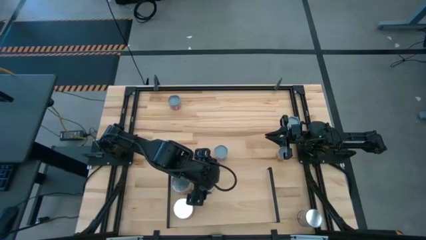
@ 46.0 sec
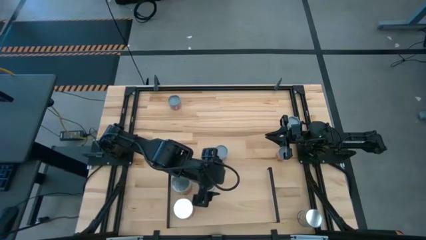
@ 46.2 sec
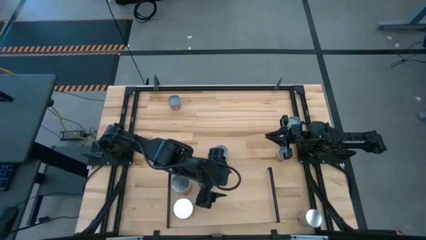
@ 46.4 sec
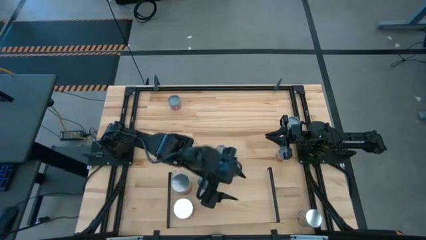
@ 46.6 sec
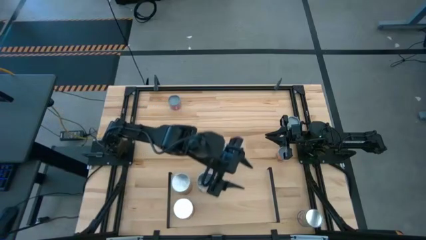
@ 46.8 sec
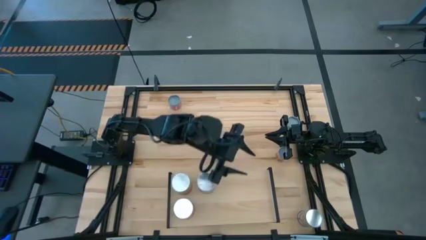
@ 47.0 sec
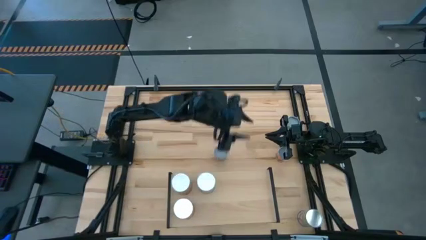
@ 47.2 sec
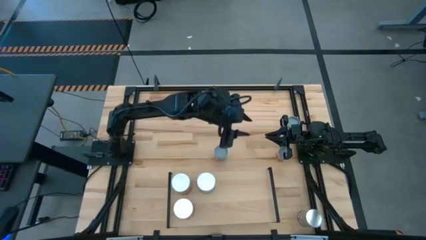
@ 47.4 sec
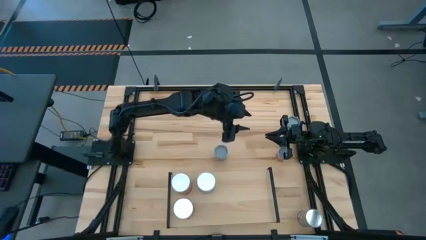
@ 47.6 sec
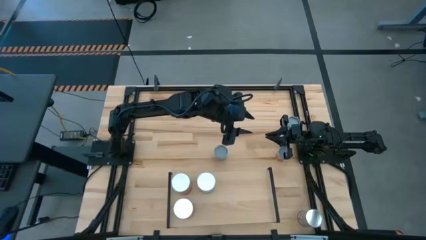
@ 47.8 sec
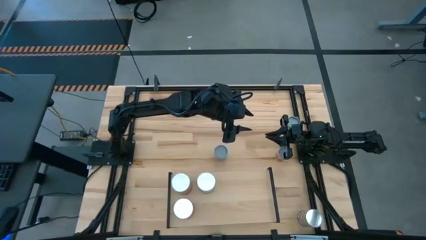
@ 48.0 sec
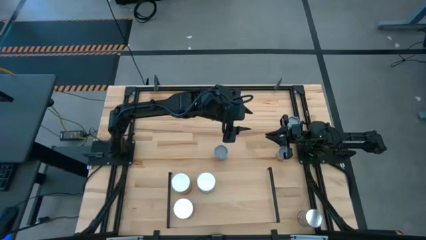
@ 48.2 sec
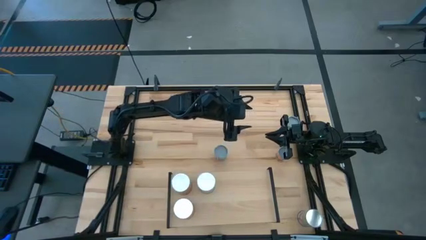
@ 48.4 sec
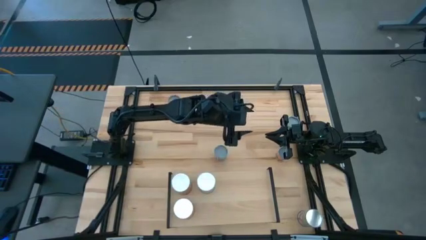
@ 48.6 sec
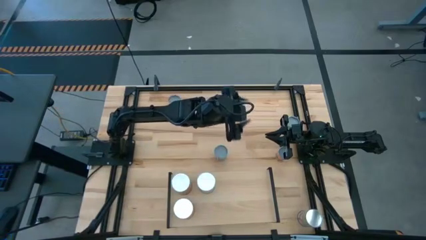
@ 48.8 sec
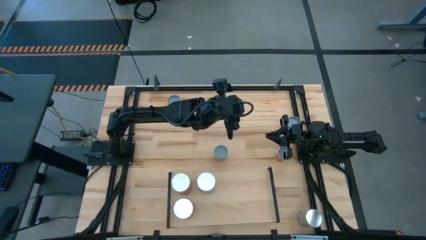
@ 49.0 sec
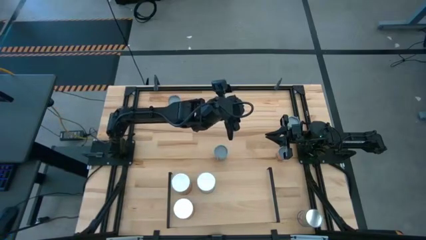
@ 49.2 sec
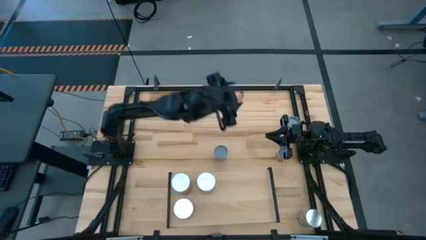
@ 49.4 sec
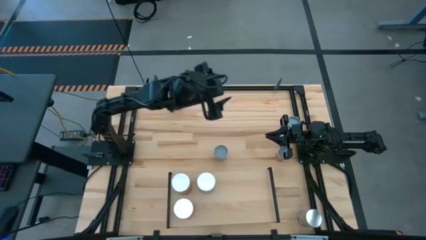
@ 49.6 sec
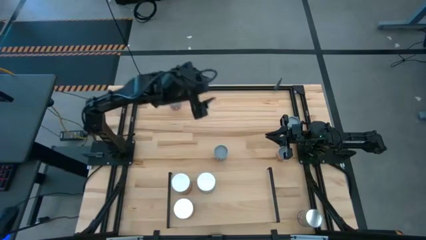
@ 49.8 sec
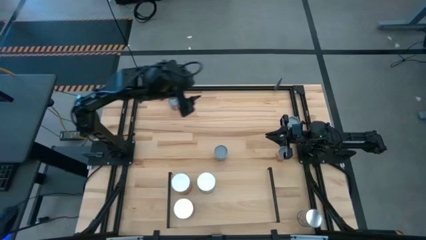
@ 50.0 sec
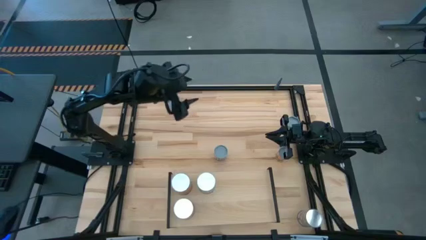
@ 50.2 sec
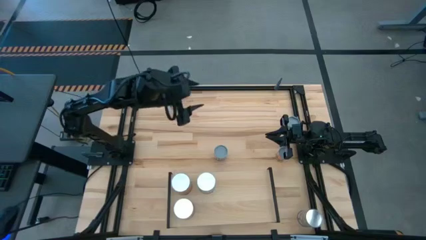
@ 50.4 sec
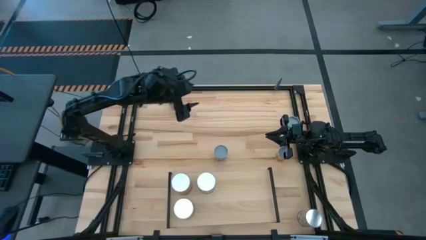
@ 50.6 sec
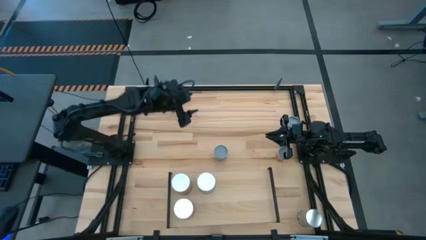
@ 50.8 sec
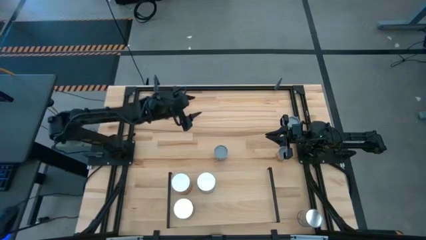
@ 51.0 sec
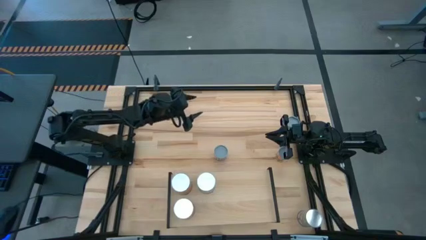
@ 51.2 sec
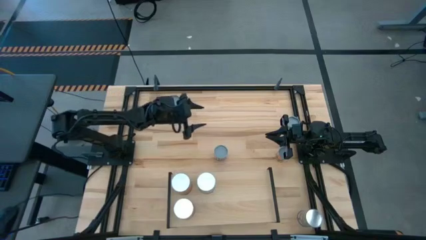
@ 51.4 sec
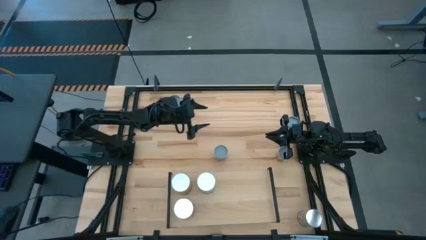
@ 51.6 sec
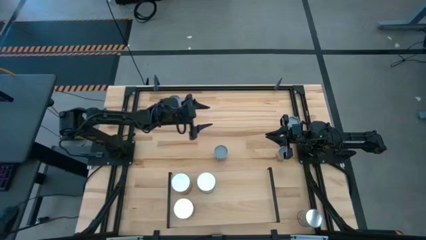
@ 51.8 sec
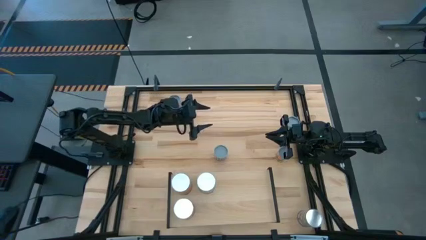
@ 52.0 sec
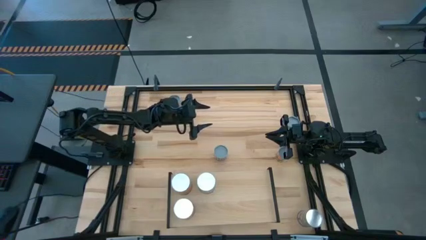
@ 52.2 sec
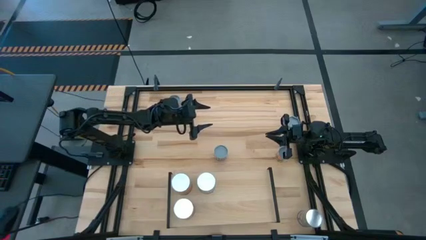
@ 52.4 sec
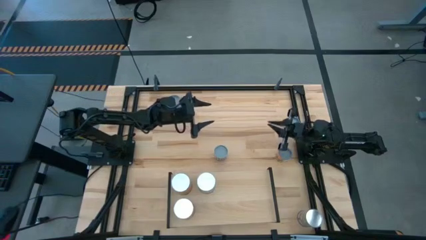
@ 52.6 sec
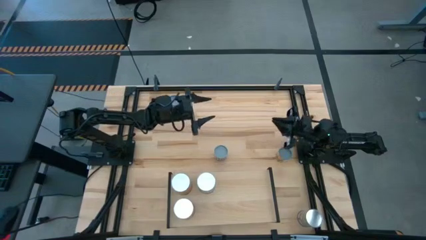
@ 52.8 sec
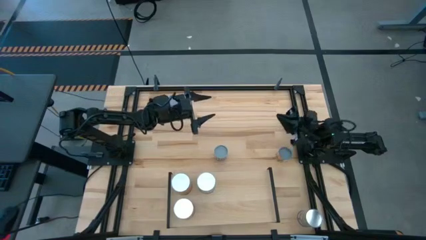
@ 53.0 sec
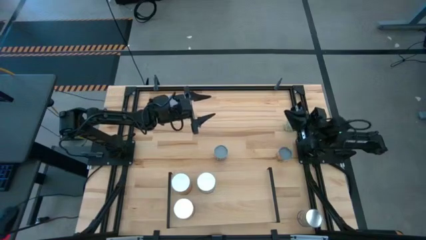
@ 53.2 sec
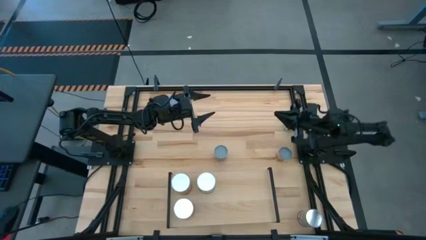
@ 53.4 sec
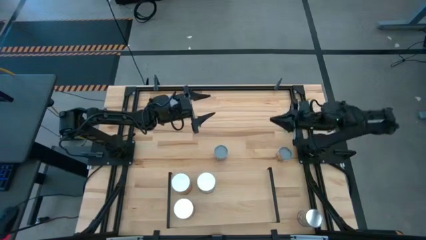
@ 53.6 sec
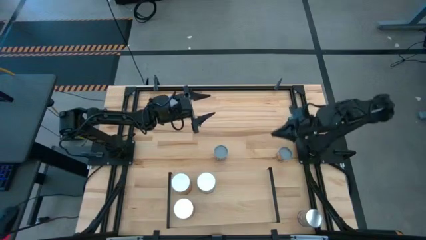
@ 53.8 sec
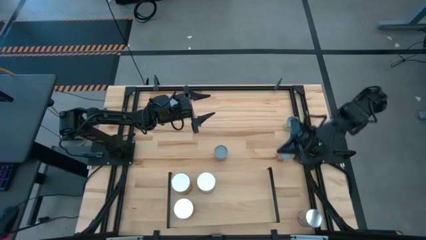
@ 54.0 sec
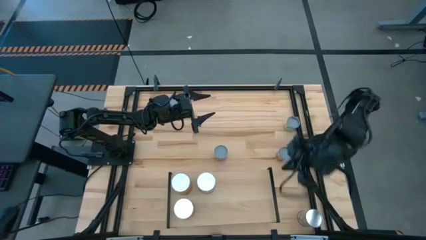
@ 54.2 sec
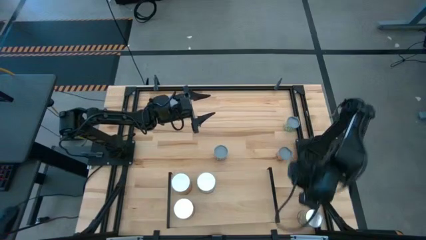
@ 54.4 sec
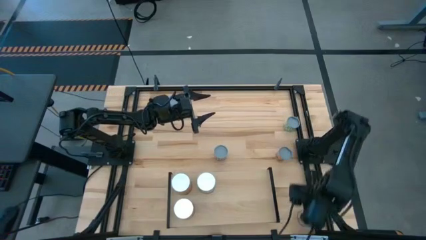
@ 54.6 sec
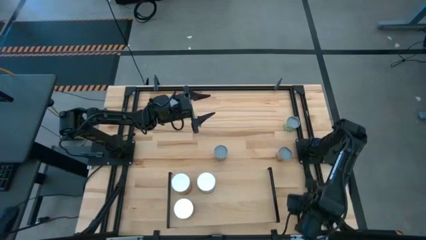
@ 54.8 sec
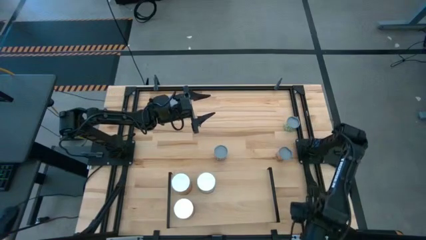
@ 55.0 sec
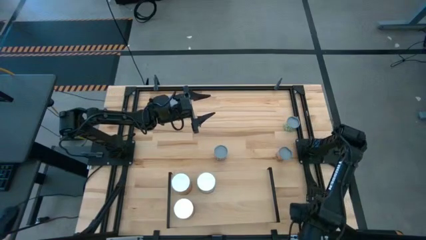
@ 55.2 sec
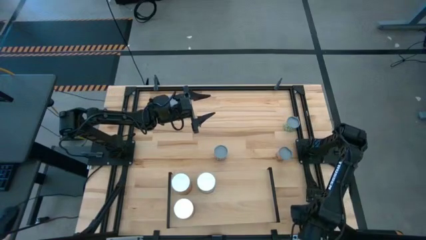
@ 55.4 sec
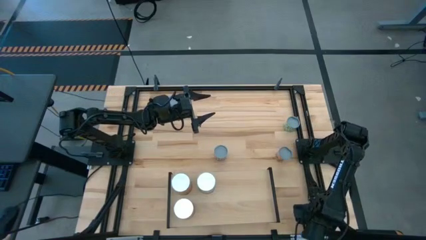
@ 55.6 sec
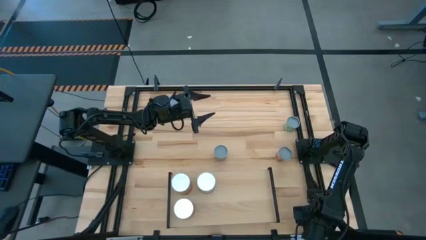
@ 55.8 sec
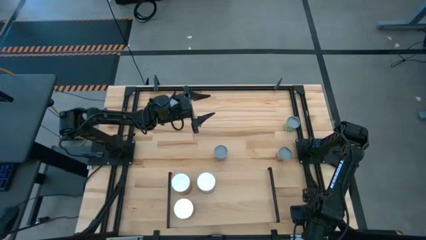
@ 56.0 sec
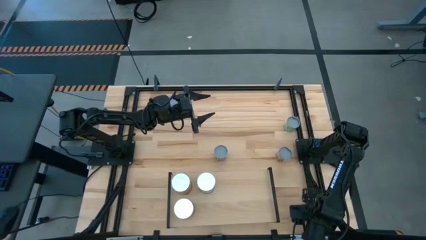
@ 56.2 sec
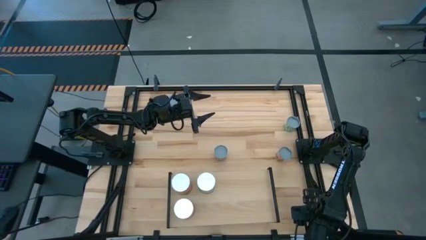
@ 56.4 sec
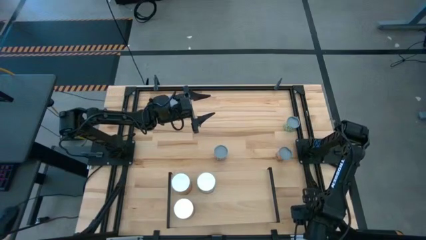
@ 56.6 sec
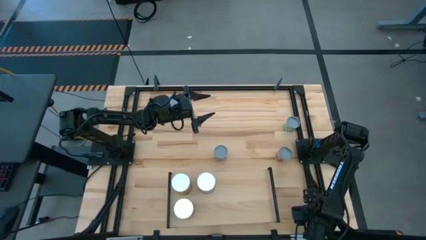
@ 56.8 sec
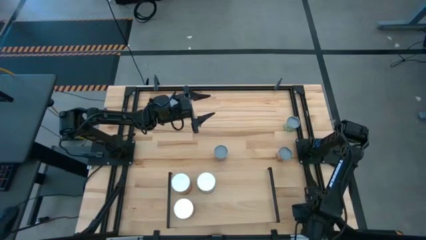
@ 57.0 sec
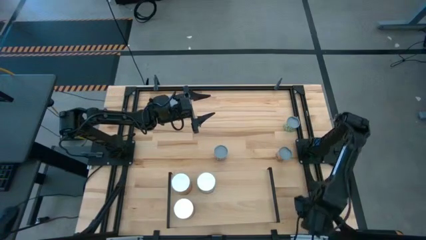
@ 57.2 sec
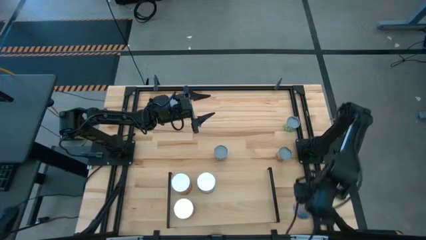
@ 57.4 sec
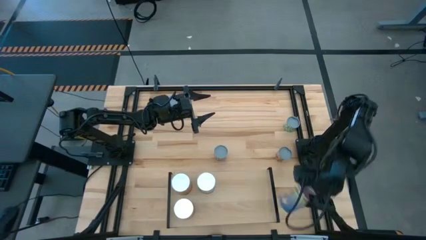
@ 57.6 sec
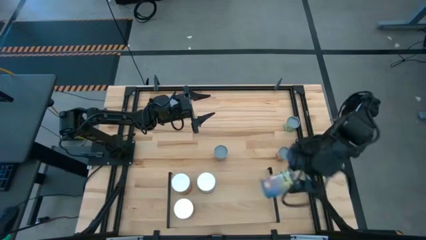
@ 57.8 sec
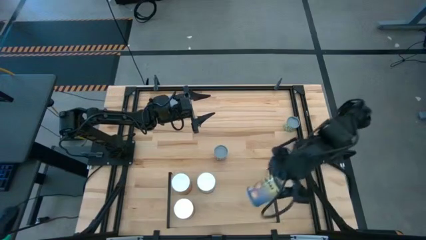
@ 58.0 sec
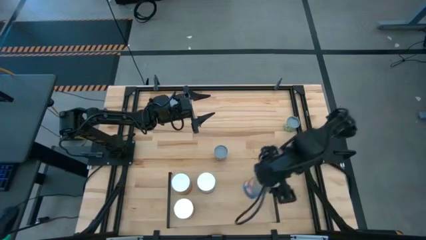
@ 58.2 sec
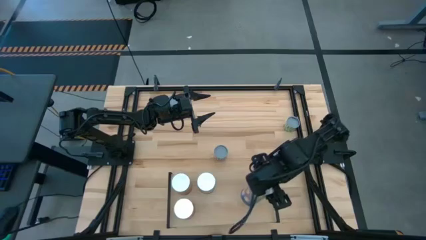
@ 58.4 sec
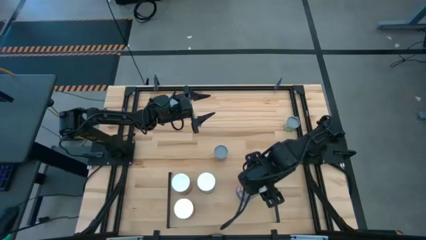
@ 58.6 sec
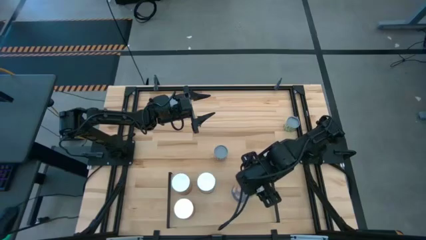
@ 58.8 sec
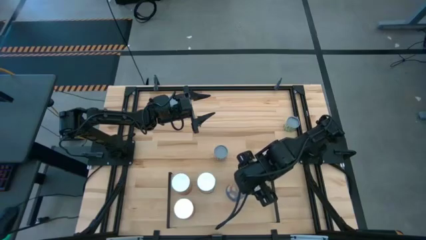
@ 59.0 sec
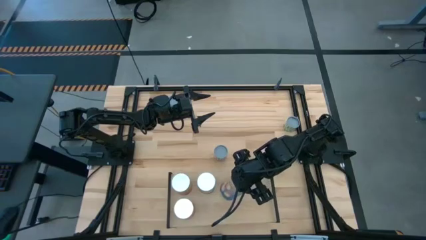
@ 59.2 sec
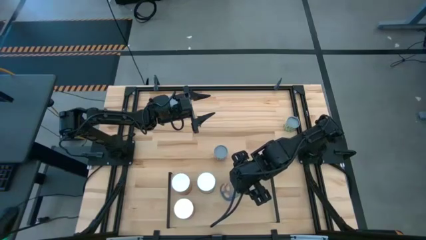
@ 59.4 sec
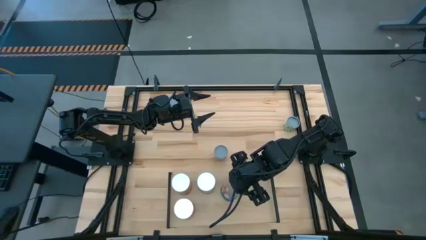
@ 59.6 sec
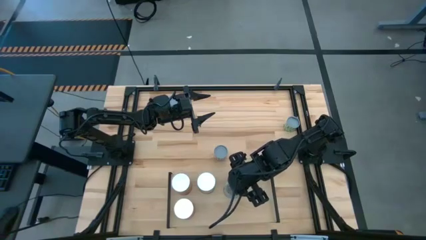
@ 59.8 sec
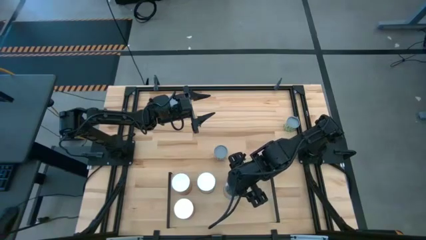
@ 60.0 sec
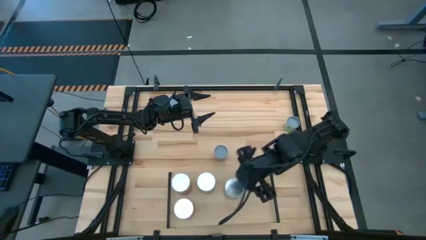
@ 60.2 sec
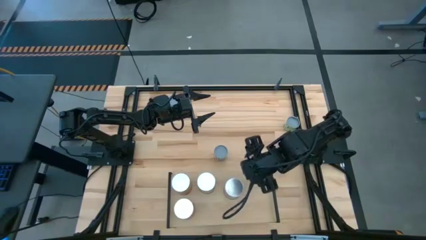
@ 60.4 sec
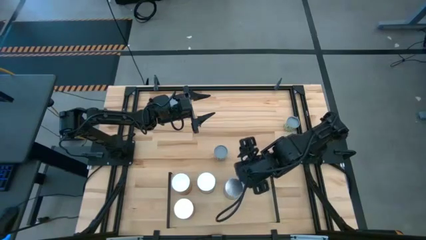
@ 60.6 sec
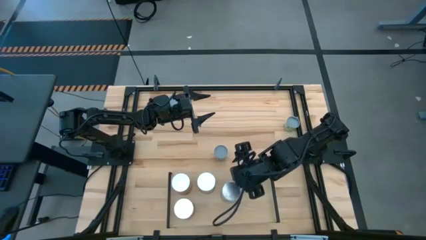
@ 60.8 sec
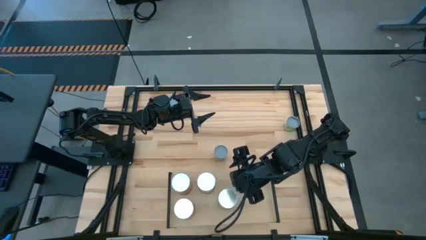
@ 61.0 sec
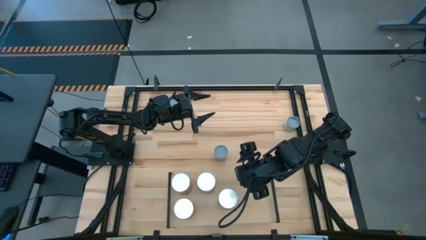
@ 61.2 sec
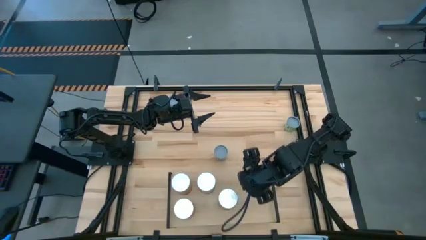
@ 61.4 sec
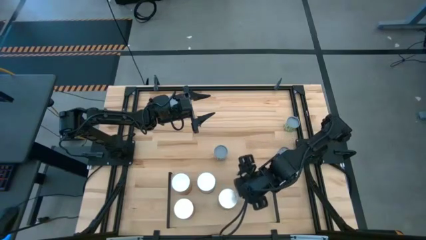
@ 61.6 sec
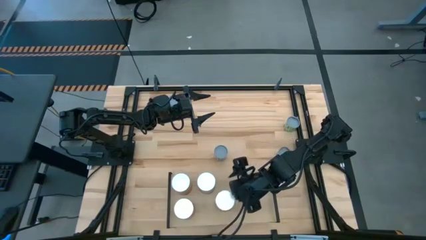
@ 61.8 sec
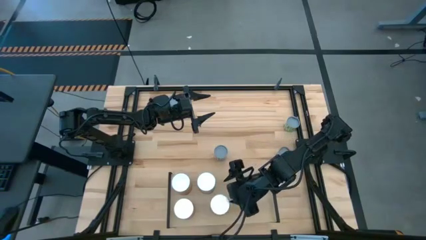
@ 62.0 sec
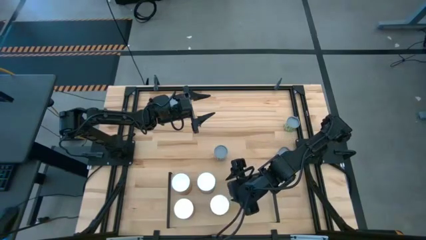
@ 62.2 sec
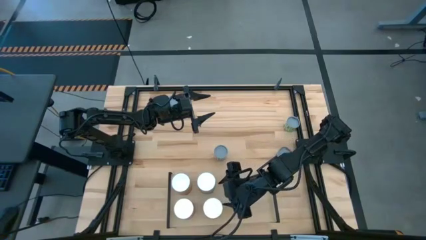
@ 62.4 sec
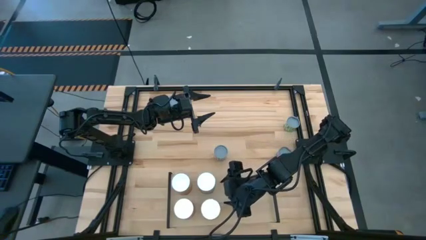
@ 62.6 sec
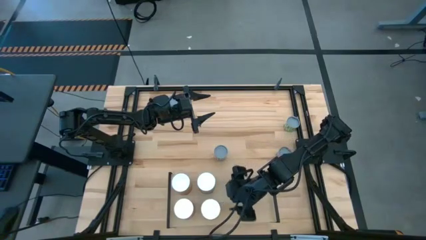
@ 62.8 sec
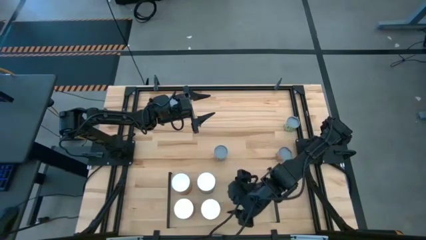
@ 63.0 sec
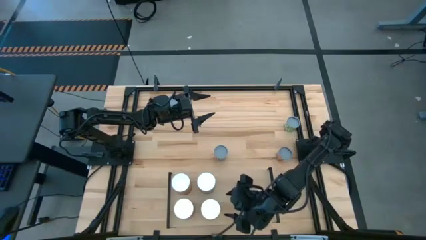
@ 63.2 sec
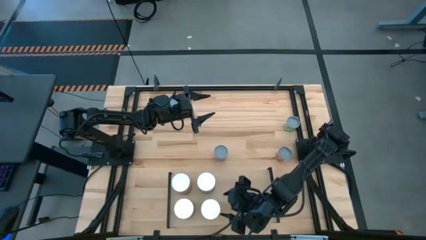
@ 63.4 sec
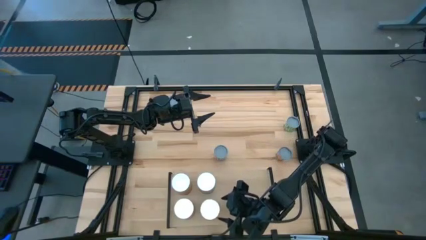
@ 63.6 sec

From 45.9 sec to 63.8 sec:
Task: Pick and place cans onto a shelf
Put the canned peaches on the shelf aligned with the other canned peaches
